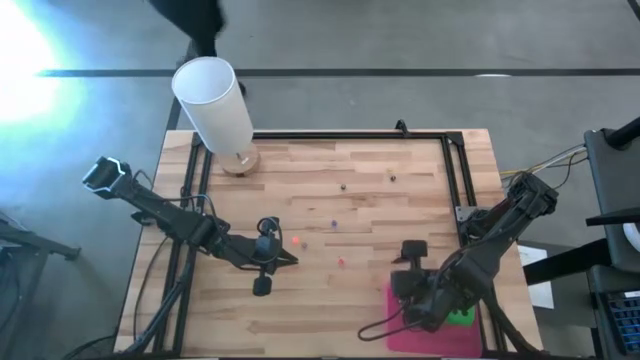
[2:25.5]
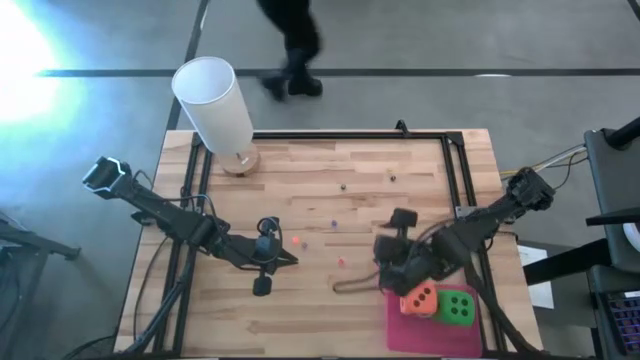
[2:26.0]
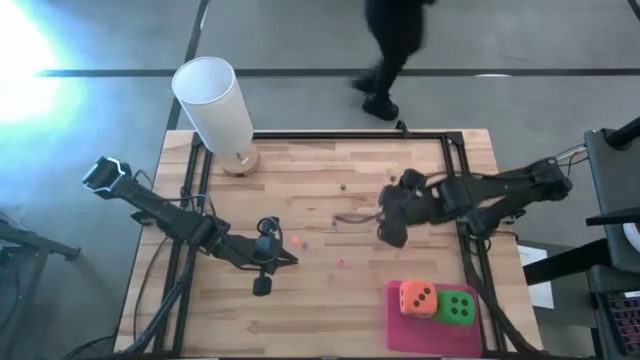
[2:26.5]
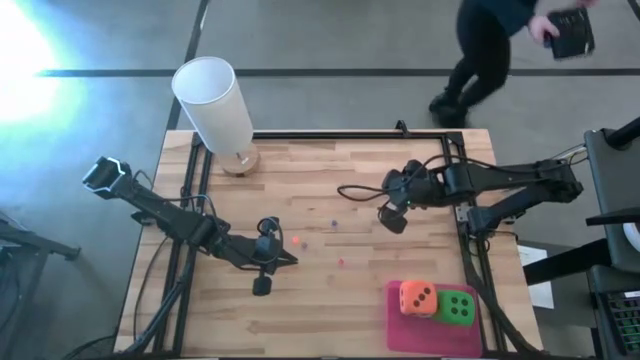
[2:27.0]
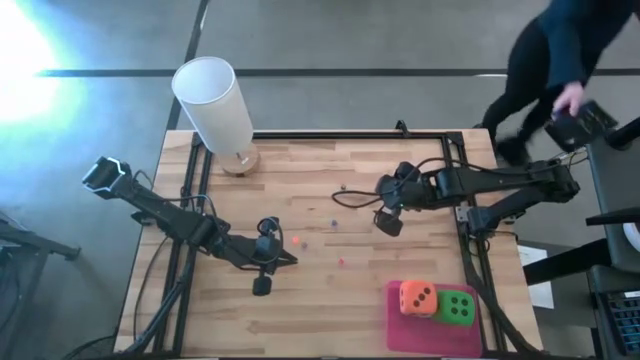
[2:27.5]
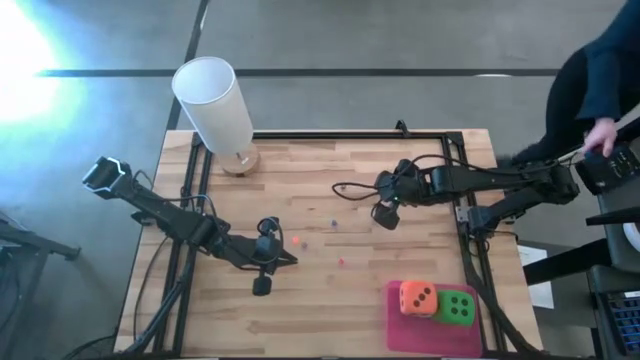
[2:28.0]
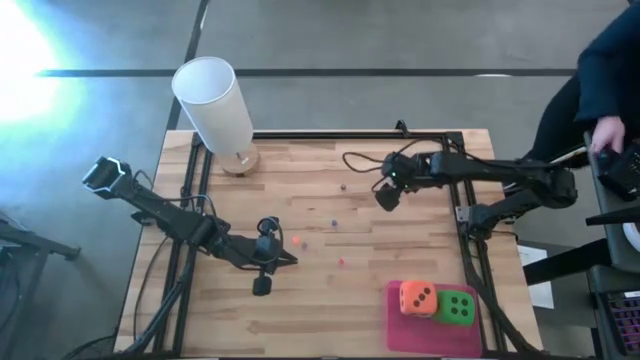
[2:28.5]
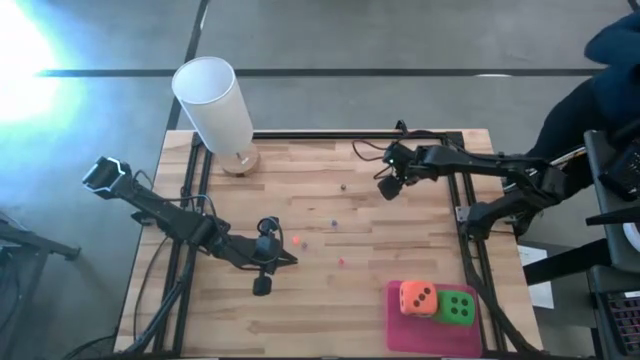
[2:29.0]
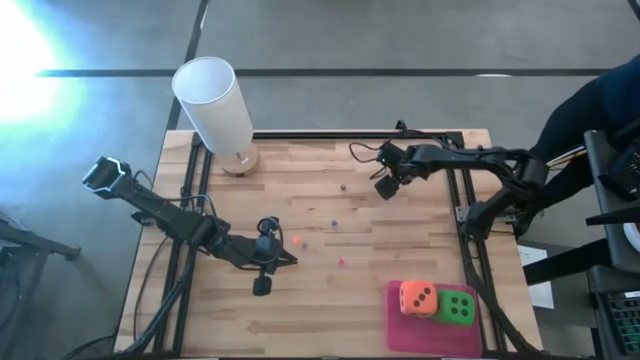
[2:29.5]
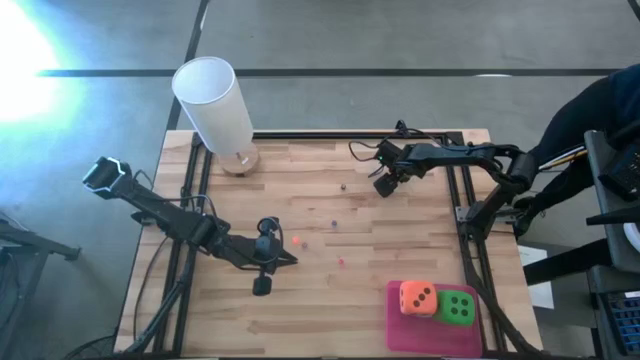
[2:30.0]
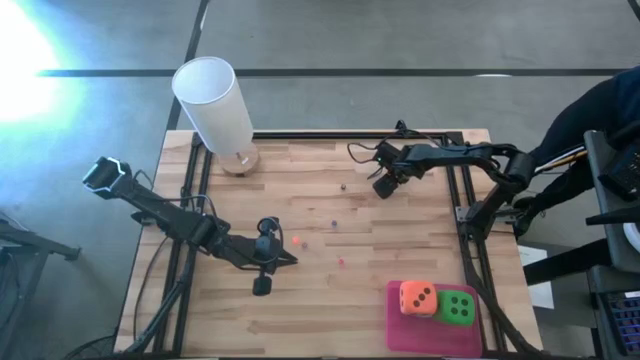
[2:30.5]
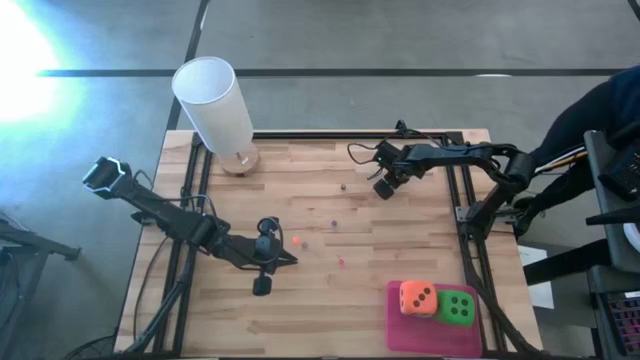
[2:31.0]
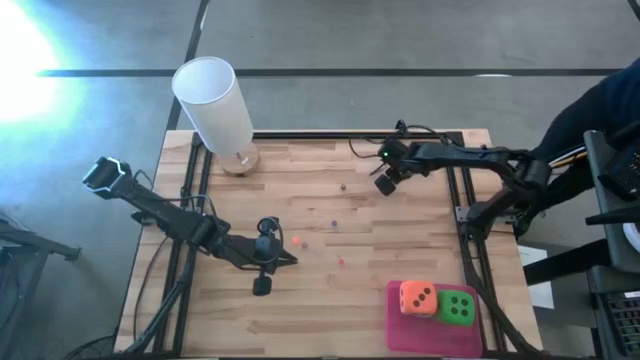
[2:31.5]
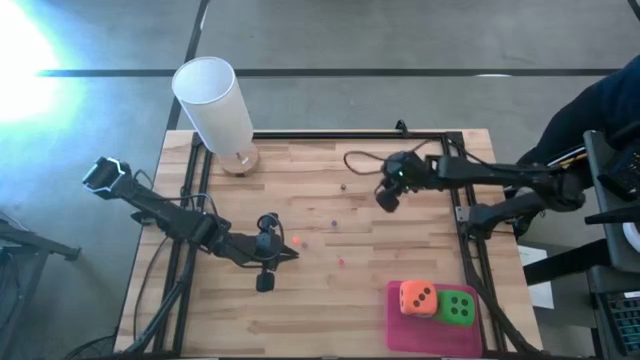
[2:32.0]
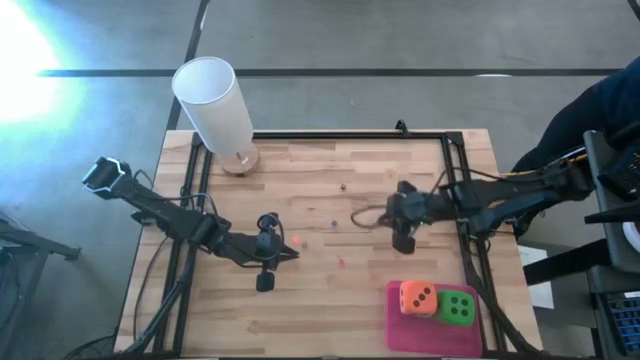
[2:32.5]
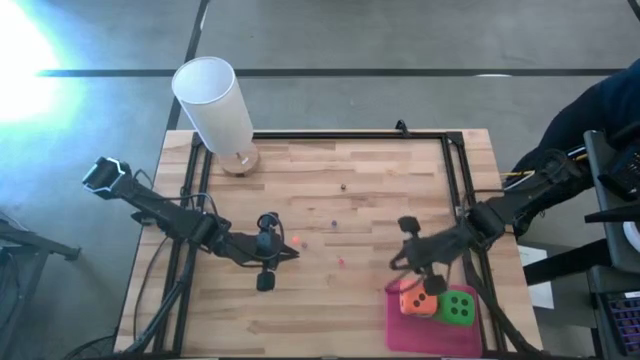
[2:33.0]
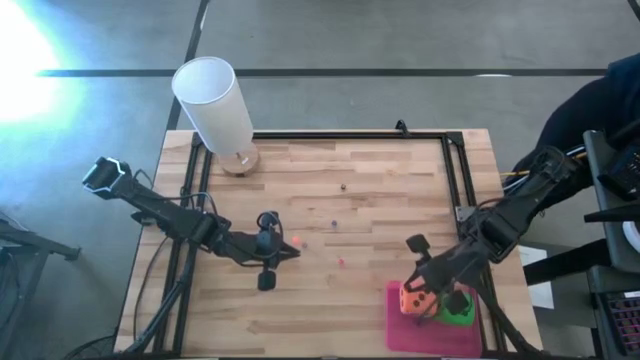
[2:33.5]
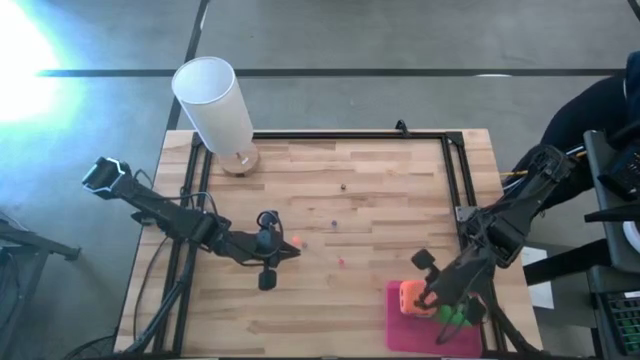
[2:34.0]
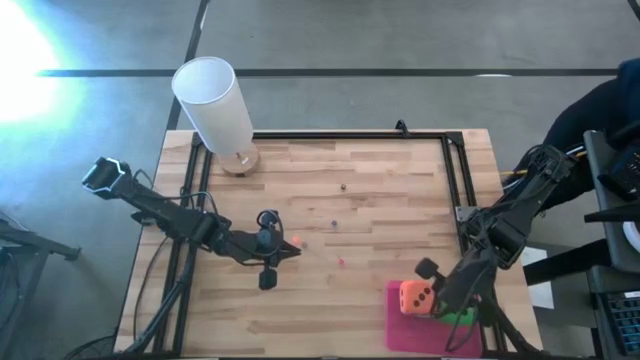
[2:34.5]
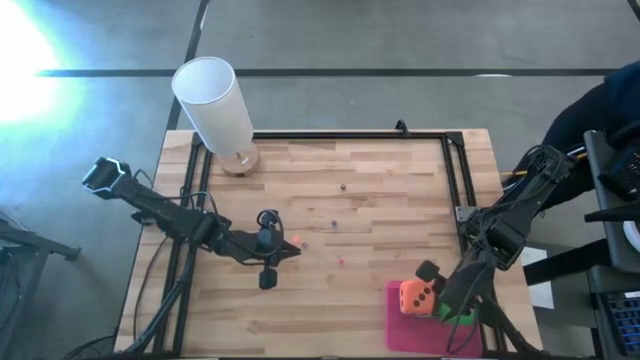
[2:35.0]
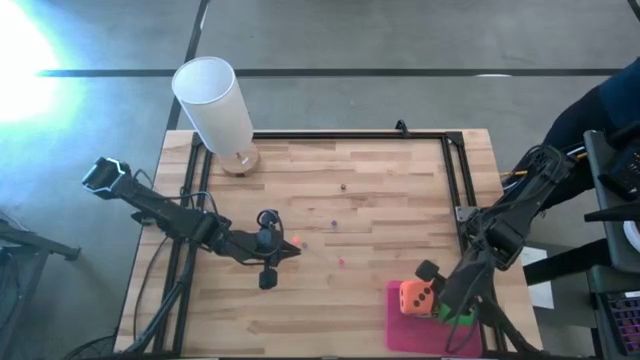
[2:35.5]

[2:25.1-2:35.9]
Task: Pick & Place Dice
Put right small black die into the bin

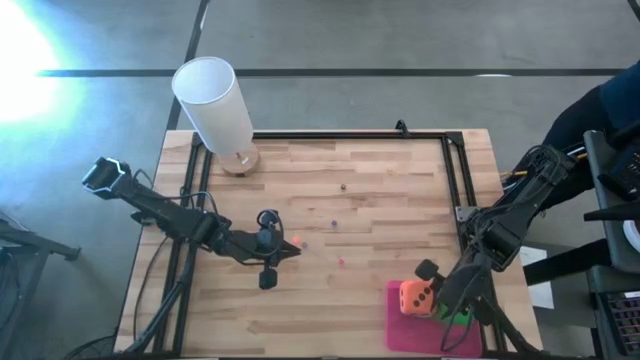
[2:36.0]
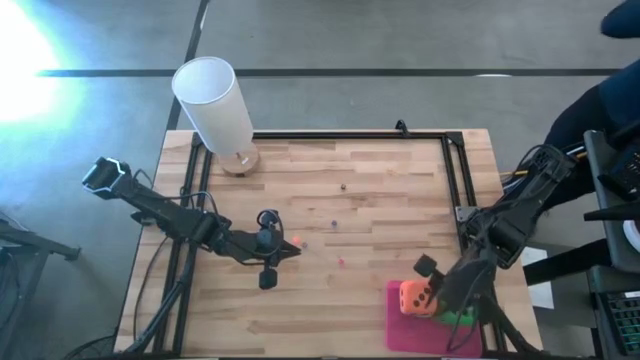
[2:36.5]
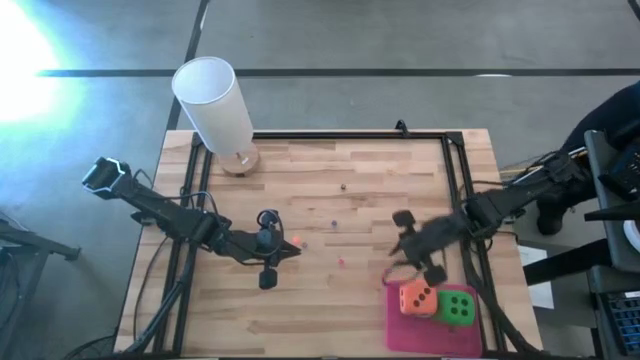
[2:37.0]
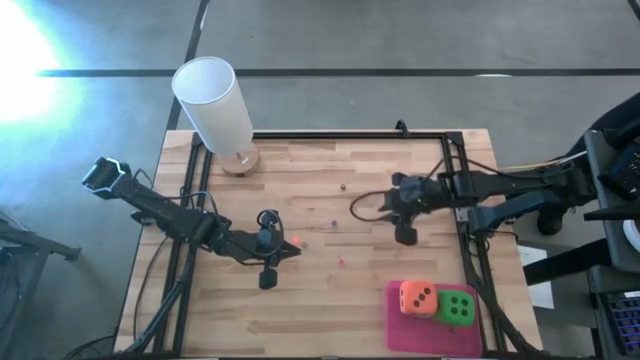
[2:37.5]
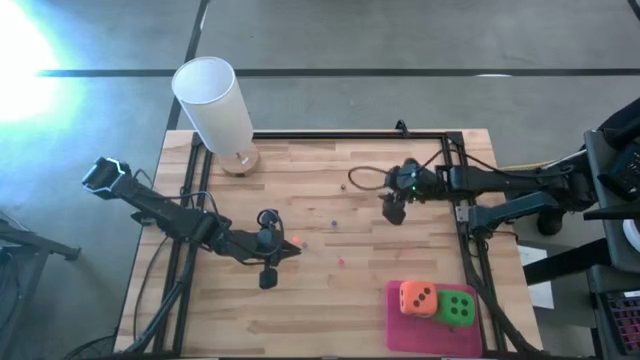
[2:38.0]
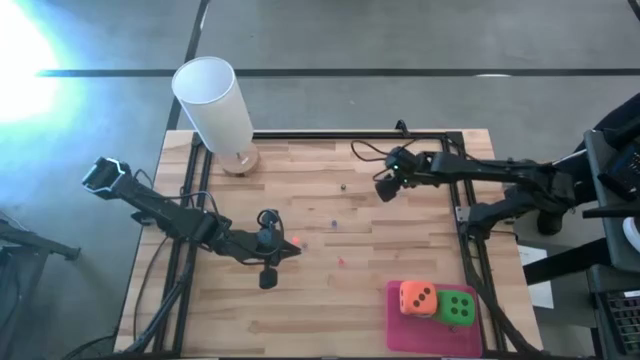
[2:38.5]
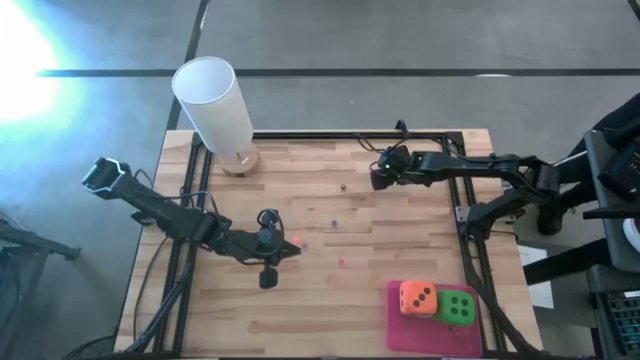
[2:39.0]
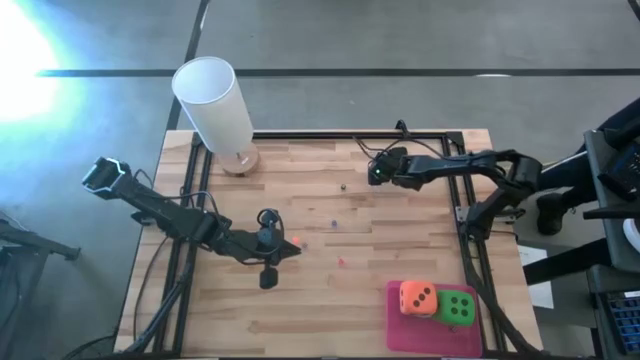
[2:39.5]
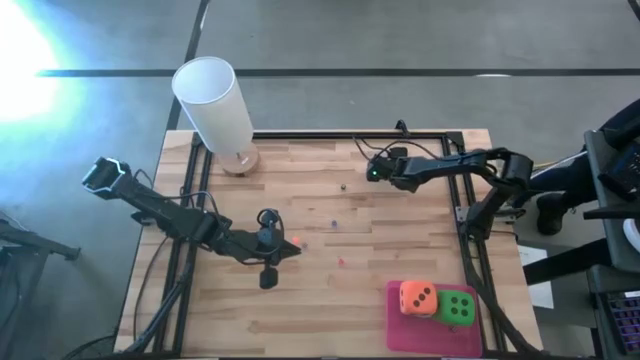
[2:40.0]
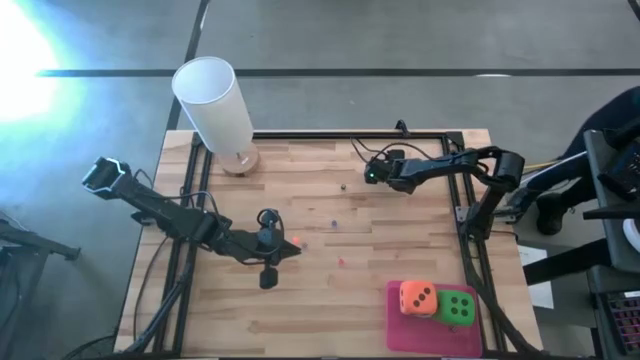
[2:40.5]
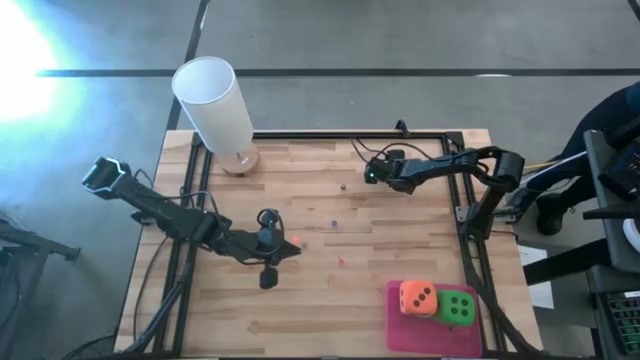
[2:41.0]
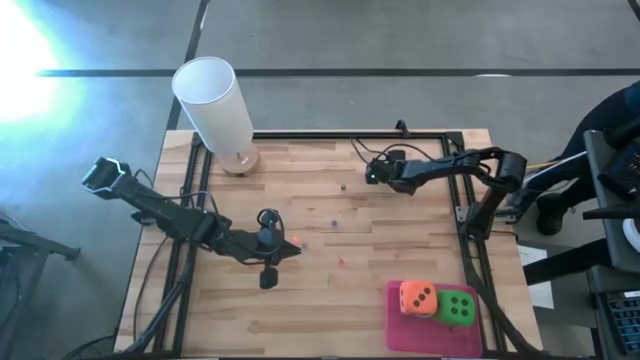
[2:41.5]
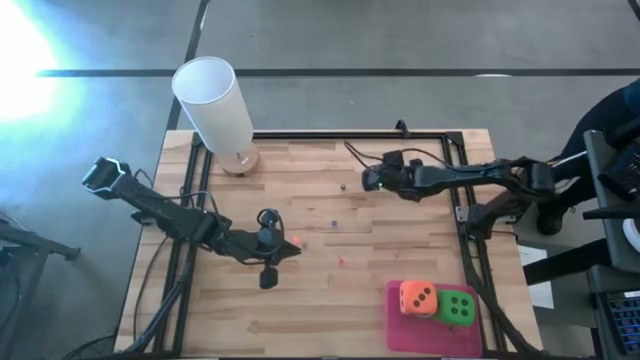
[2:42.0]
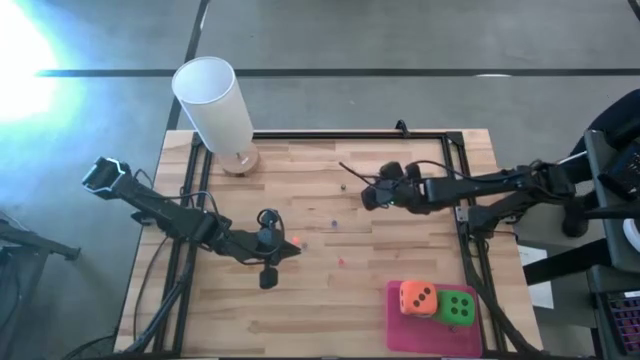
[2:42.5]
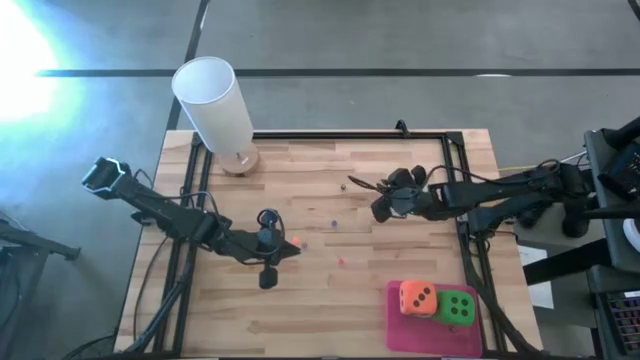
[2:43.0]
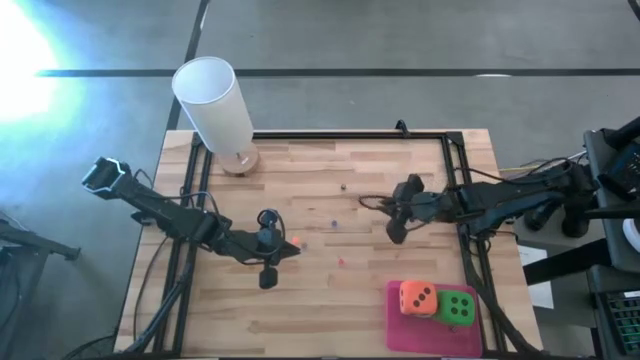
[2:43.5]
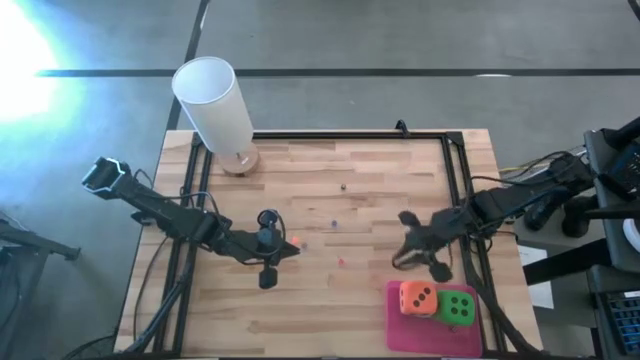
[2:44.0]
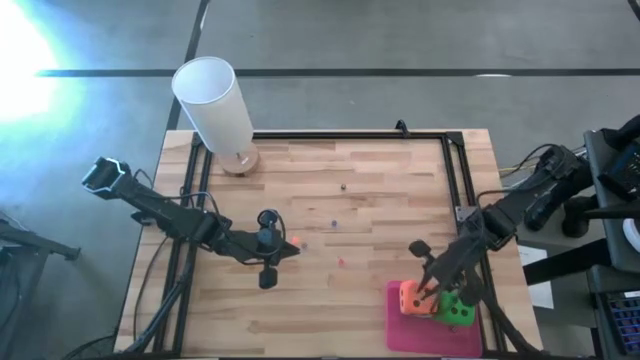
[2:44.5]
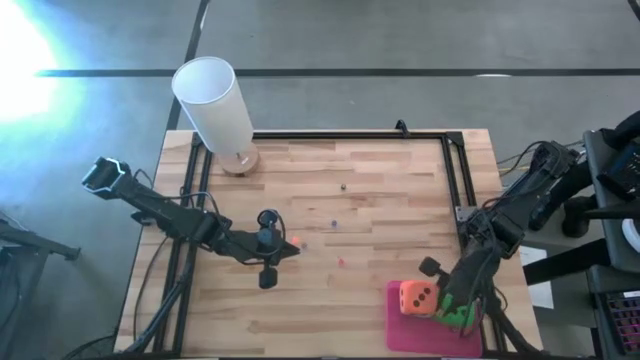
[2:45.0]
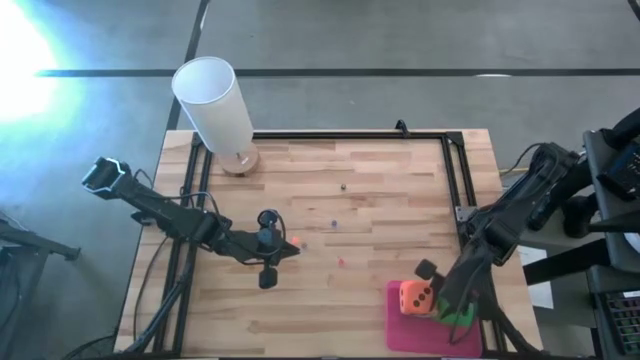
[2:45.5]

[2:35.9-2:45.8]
Put the small yellow die into the bin
